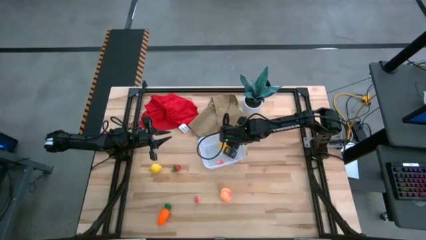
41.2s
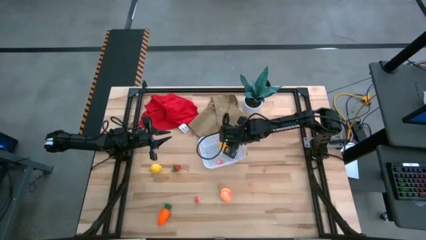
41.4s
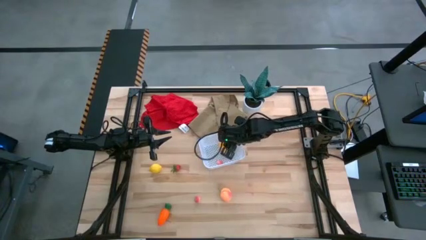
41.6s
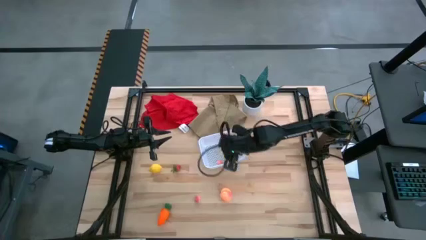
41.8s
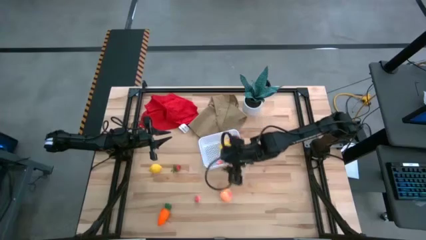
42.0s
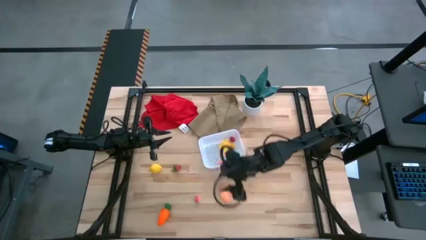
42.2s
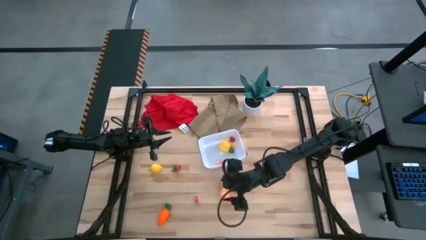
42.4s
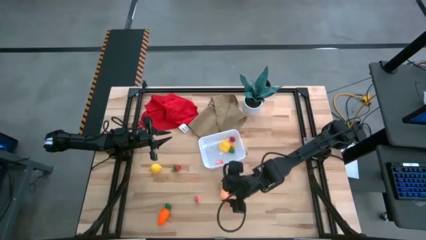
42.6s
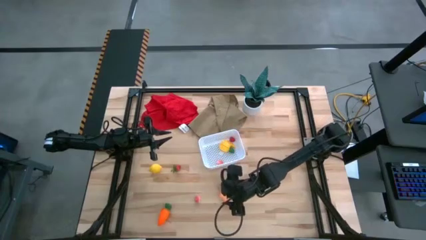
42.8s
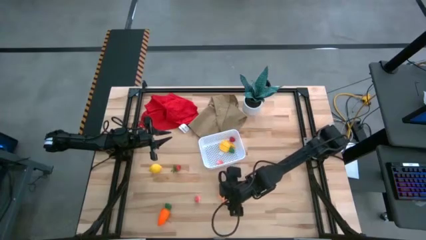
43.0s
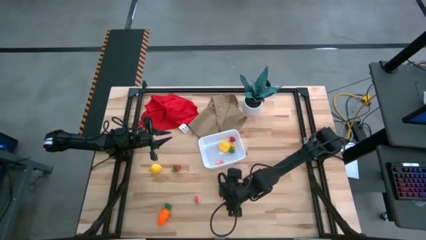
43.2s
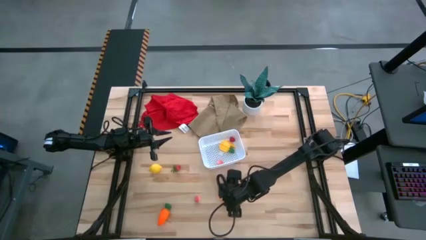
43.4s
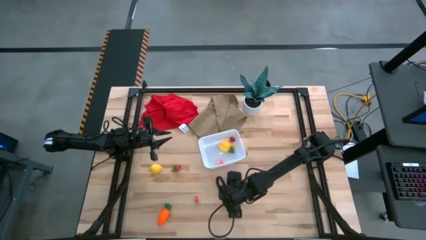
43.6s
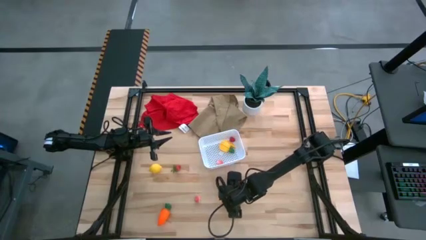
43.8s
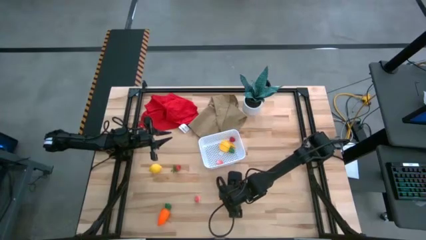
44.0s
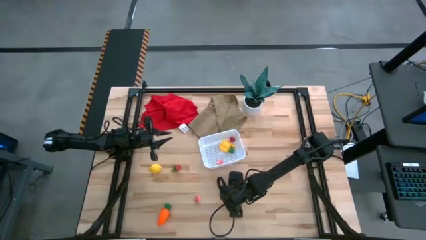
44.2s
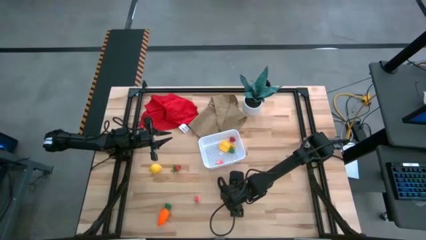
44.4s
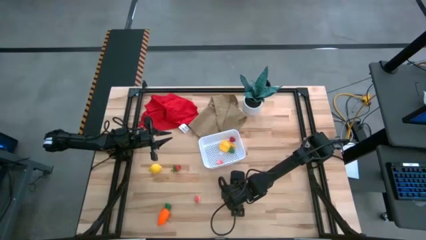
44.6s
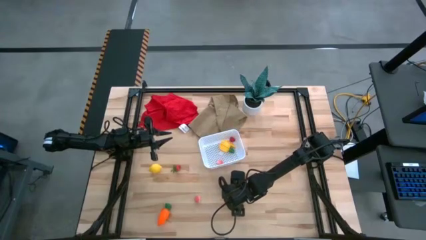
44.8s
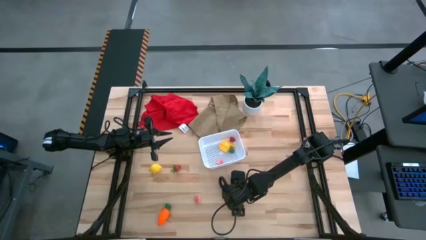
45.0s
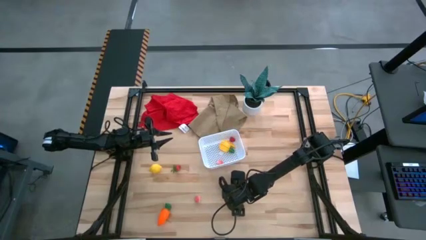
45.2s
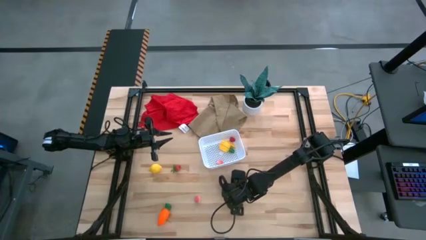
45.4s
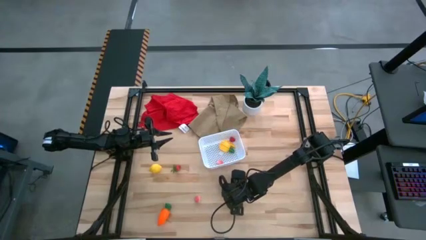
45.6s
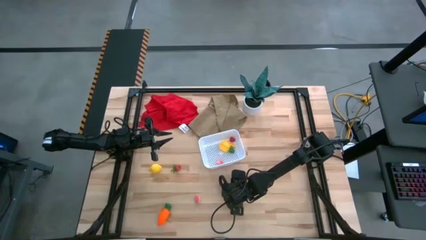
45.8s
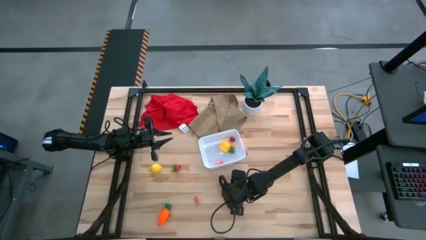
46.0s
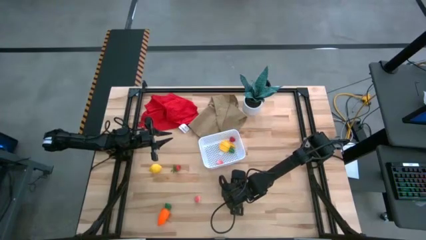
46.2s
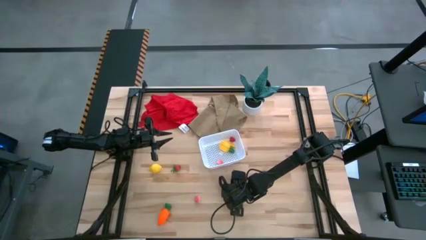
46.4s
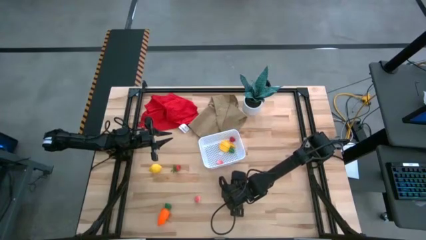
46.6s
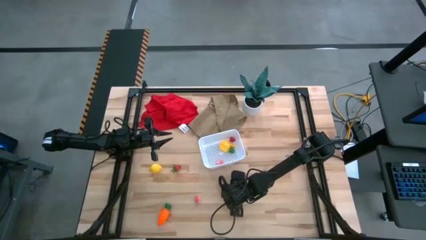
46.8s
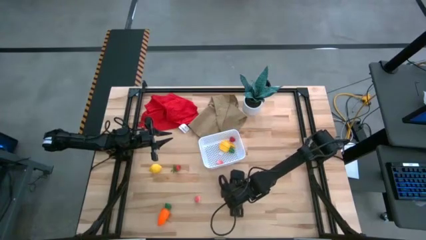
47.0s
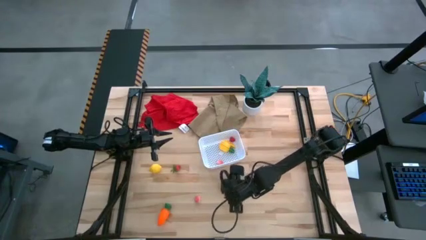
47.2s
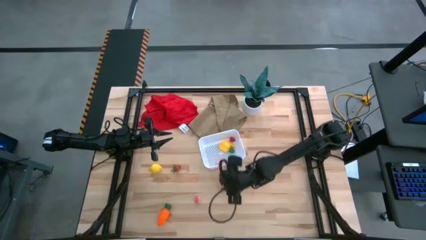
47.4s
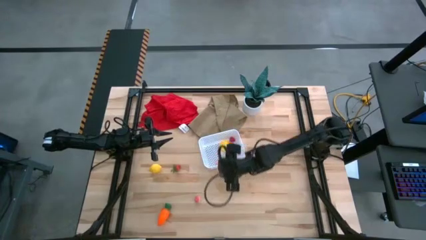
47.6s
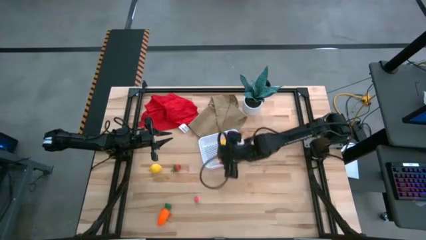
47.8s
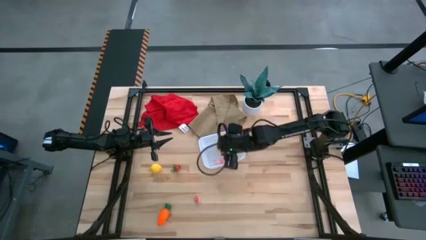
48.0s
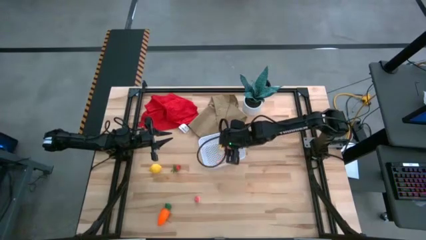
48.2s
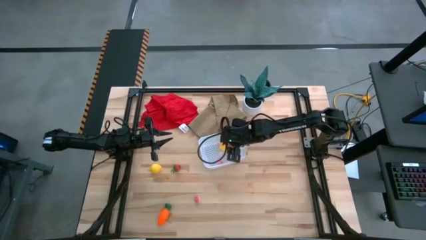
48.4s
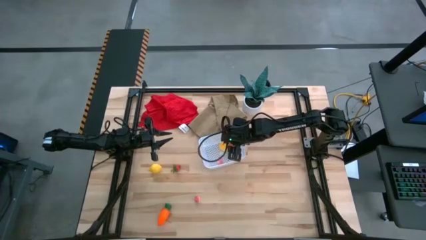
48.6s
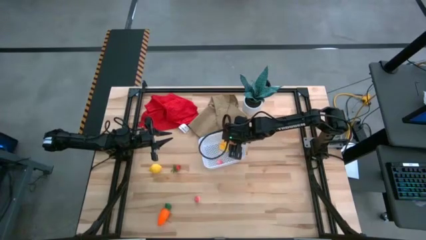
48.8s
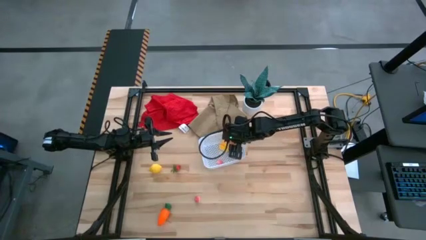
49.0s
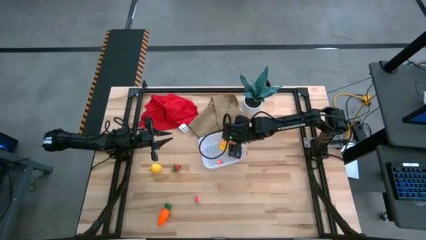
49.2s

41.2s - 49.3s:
Task: Pick and placing Produce into tupperware
Put the right peach into the white bin

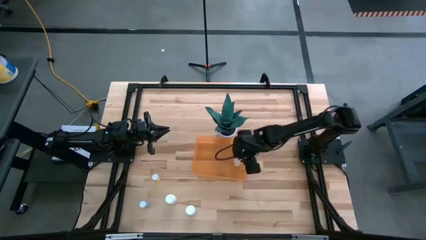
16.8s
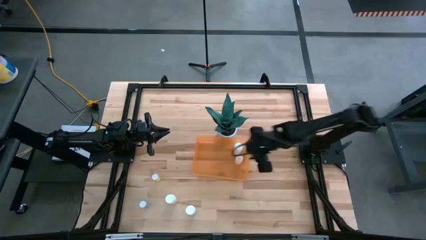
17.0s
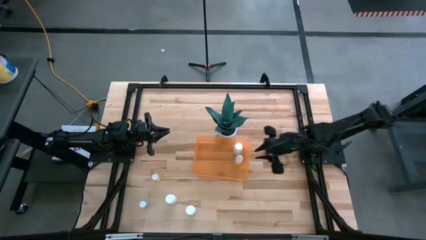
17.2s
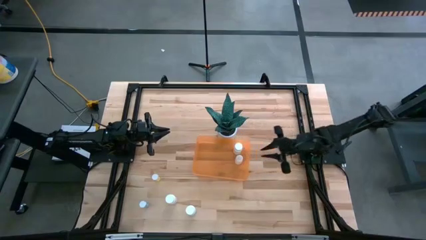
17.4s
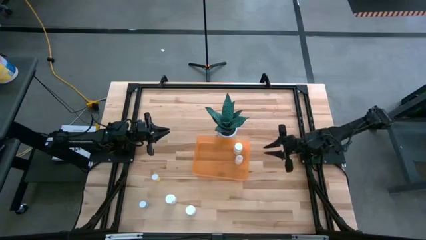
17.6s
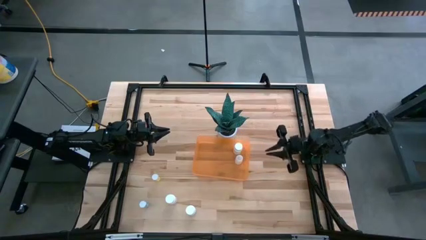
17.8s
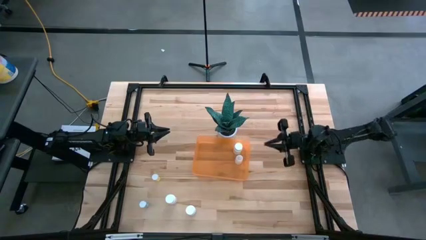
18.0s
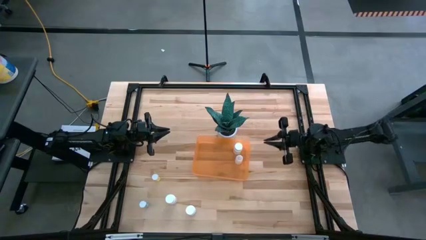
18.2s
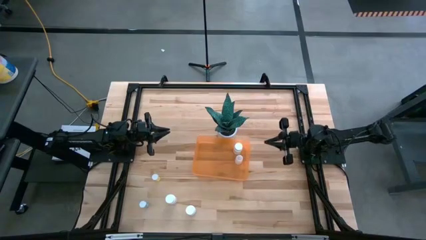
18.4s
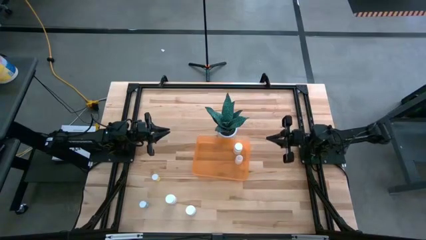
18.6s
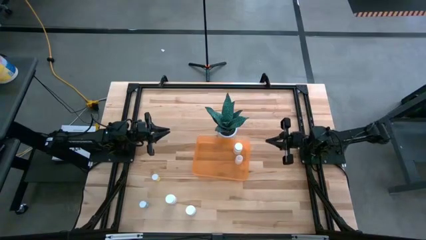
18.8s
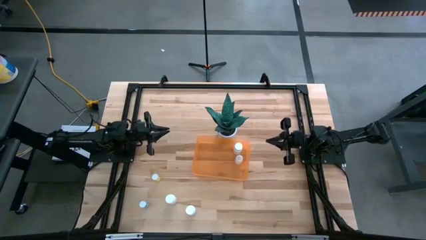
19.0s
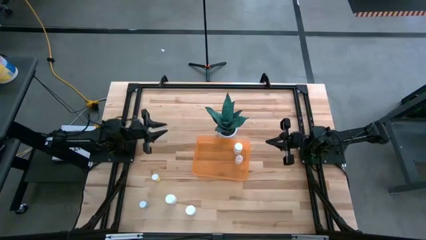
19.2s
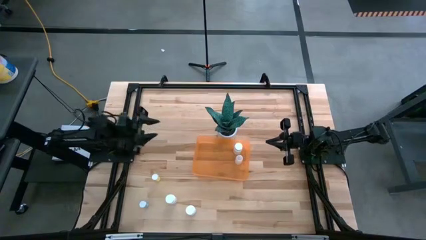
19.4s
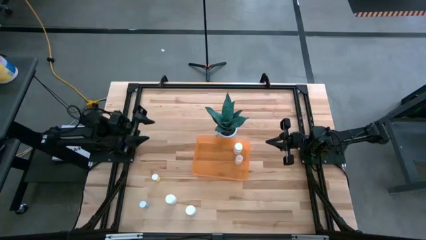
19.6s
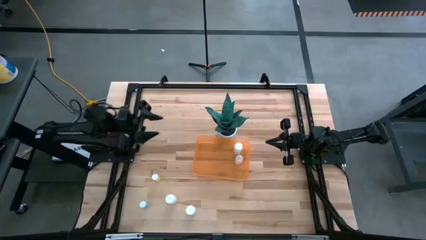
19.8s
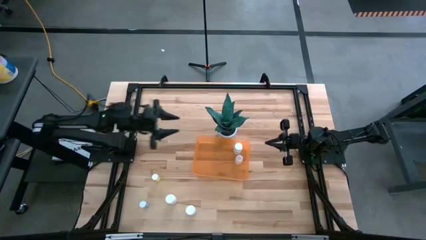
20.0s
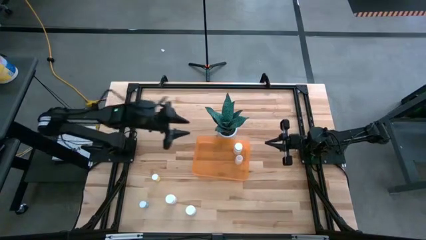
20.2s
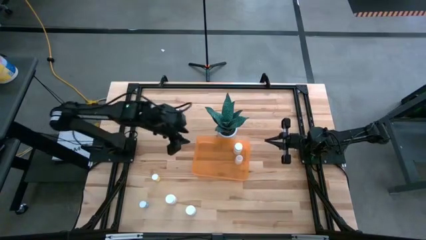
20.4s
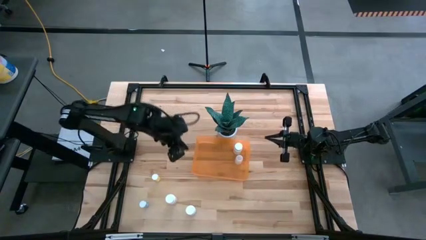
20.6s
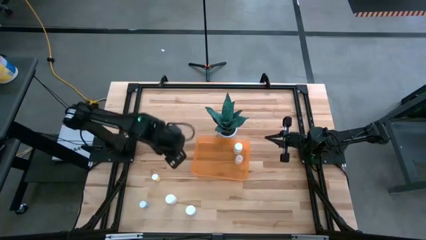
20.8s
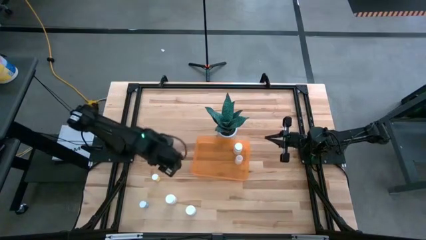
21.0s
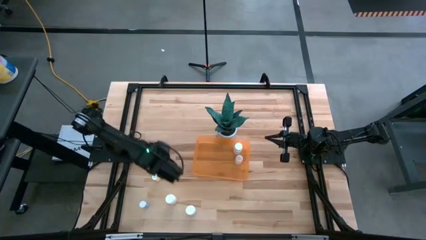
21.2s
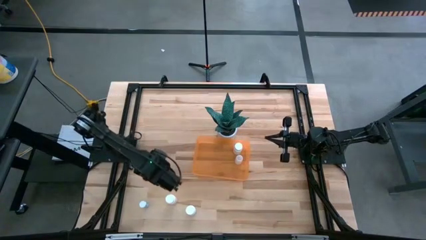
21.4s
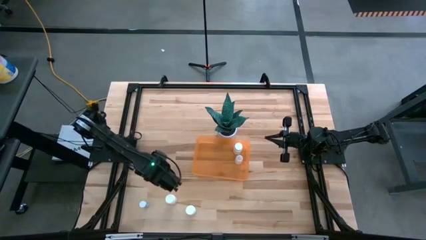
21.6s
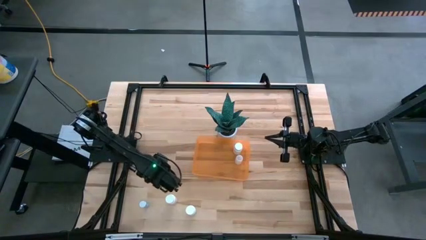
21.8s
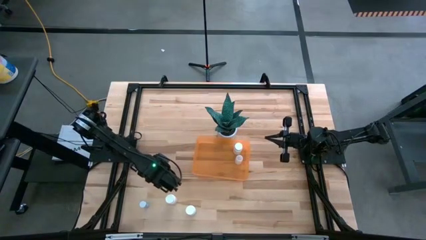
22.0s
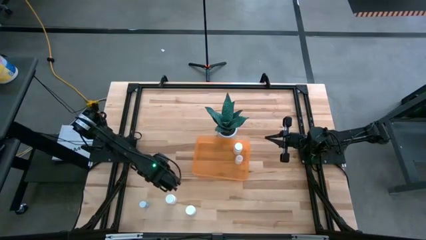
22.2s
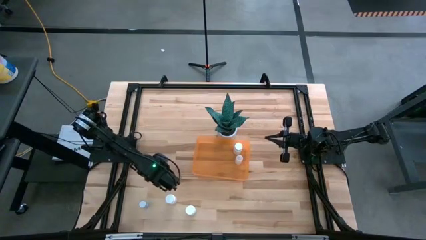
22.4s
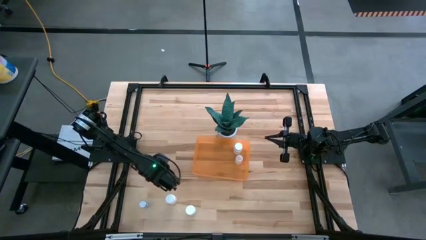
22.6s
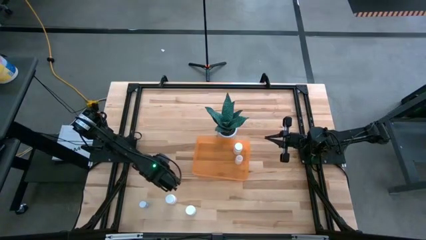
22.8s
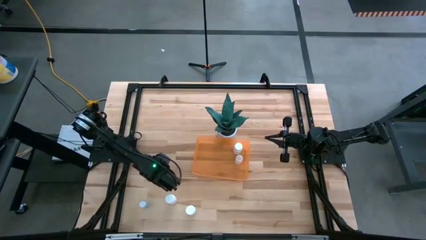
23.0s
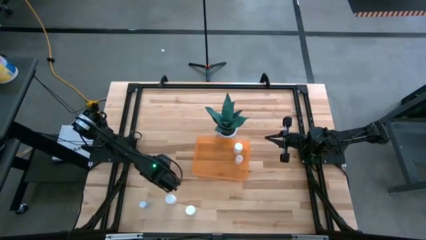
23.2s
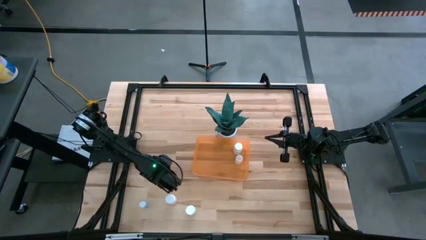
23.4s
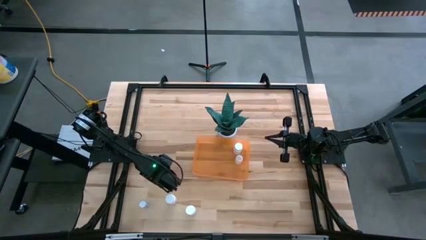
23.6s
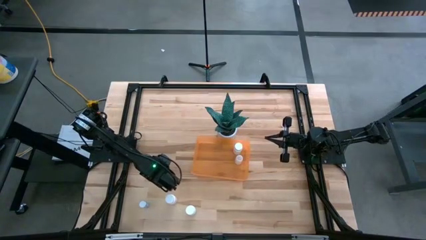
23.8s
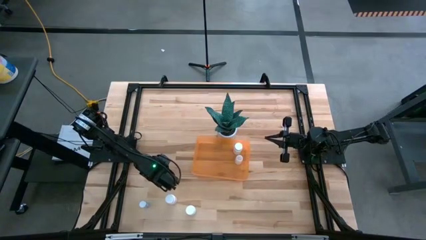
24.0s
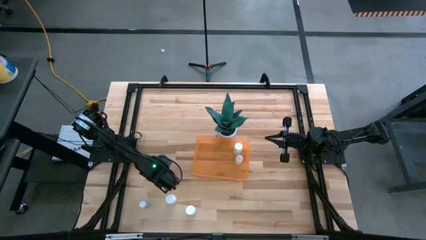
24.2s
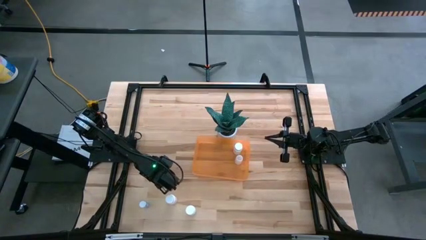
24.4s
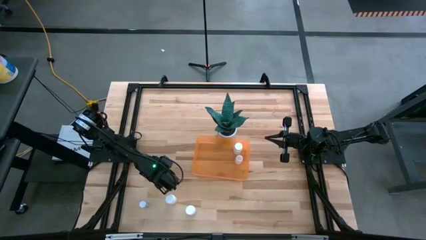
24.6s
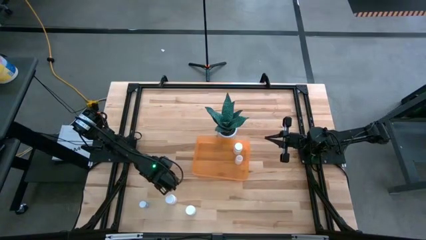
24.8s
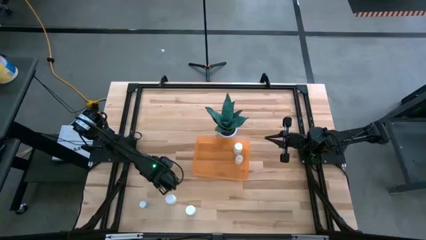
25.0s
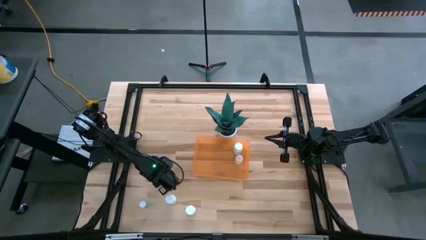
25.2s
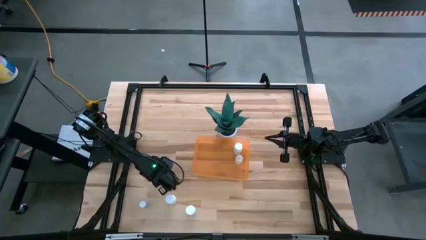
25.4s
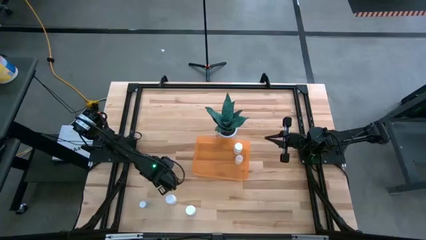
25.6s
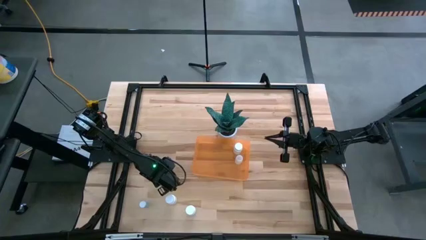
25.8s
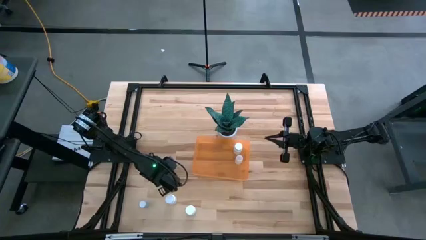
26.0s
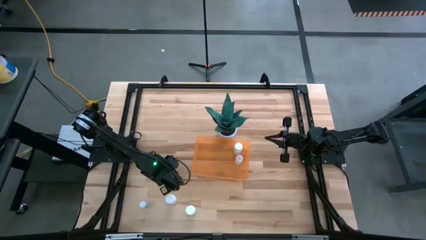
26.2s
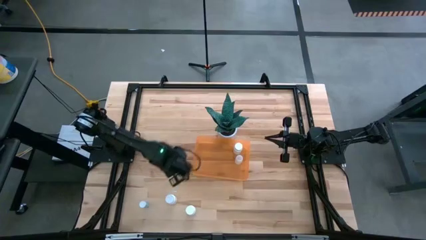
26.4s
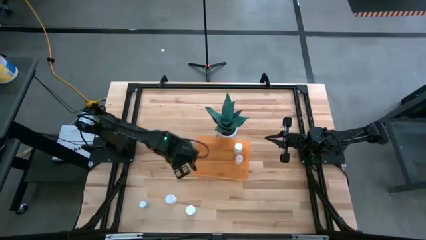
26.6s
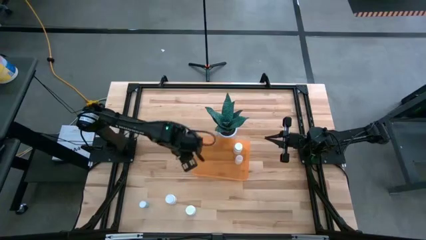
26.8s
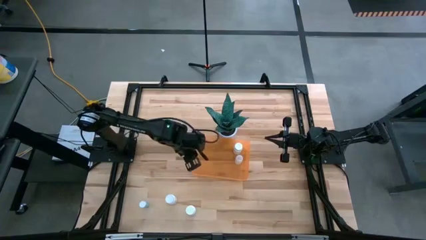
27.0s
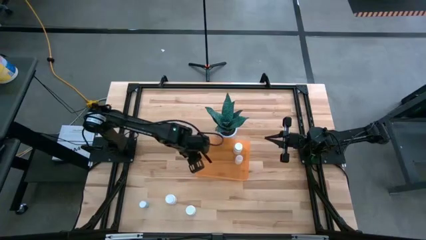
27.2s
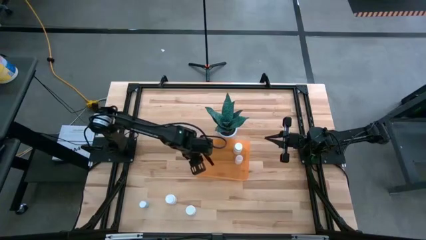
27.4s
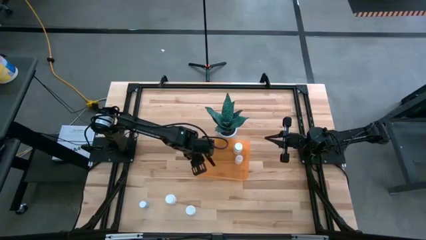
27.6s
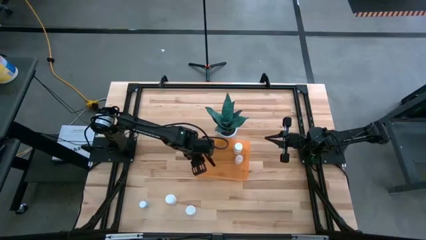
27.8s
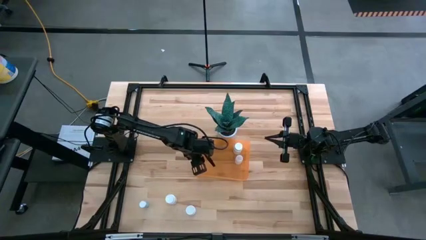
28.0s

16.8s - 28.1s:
Task: Pick and place pill bottles into a basket
Put the yellow pill bottle into the orange bin
